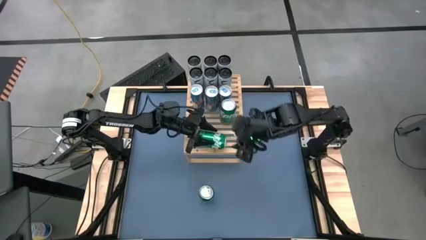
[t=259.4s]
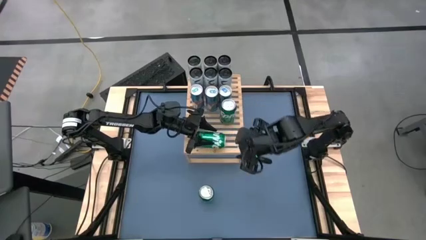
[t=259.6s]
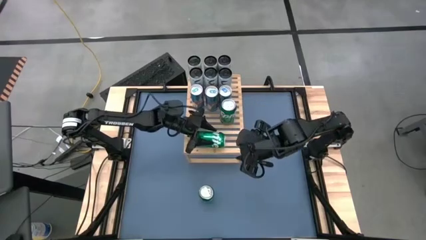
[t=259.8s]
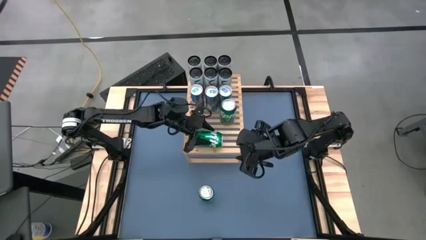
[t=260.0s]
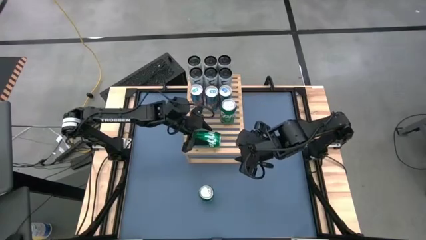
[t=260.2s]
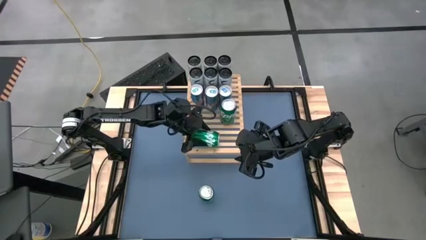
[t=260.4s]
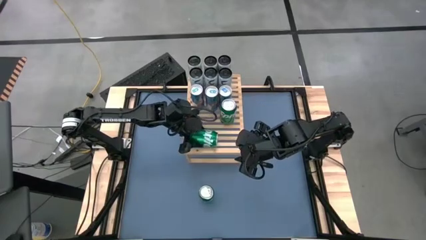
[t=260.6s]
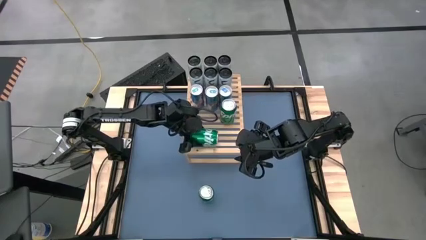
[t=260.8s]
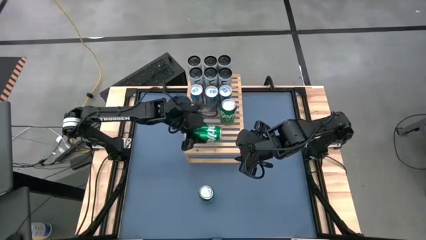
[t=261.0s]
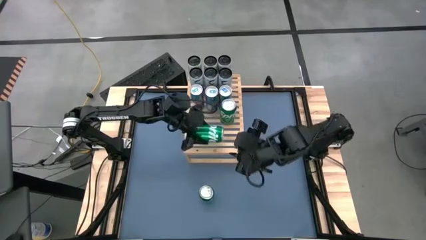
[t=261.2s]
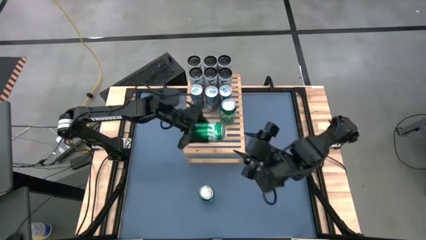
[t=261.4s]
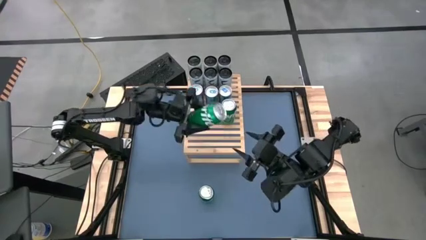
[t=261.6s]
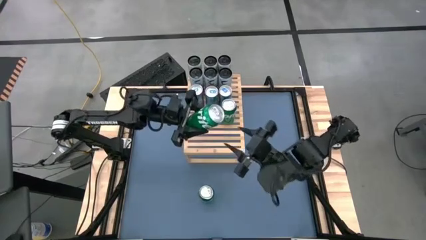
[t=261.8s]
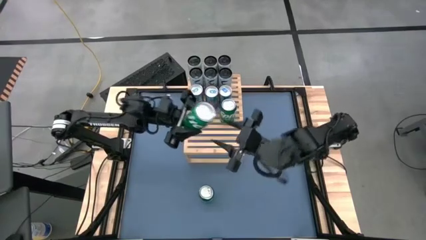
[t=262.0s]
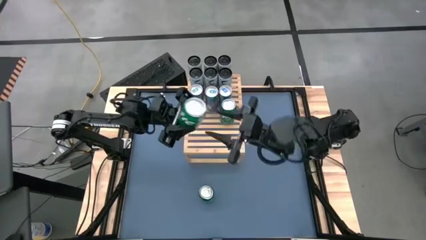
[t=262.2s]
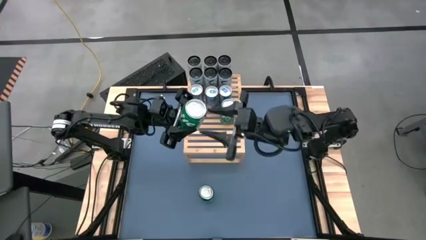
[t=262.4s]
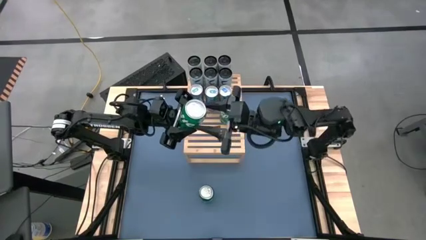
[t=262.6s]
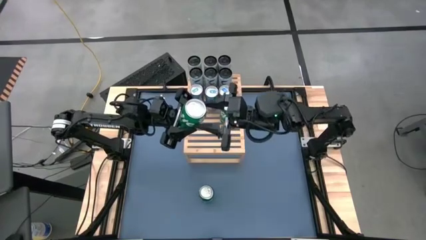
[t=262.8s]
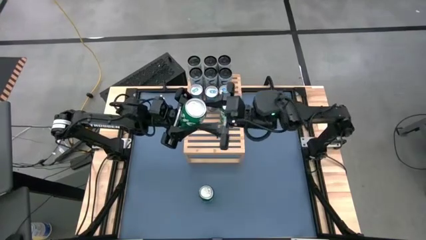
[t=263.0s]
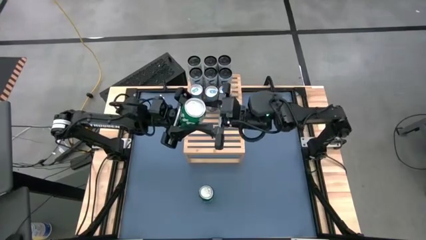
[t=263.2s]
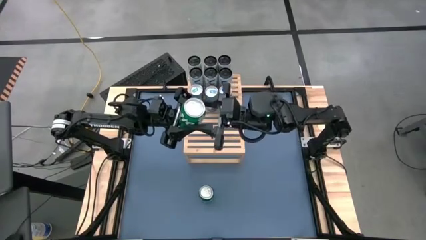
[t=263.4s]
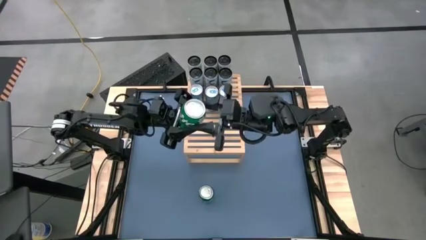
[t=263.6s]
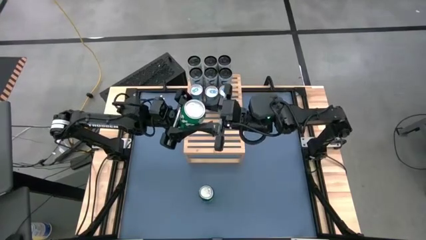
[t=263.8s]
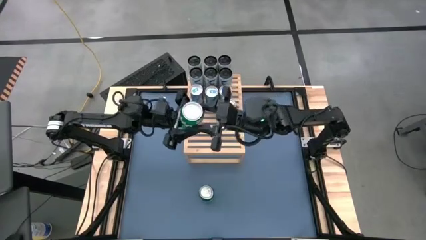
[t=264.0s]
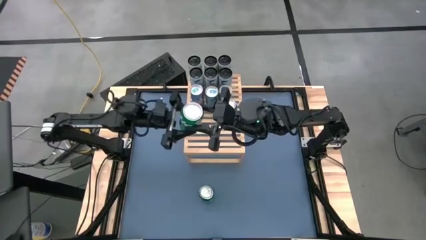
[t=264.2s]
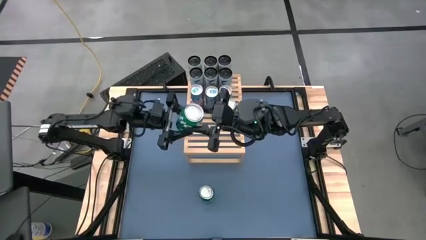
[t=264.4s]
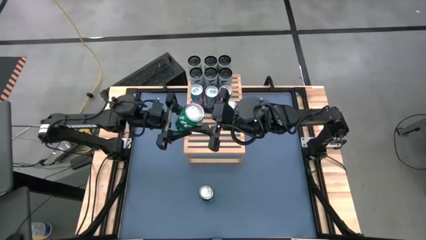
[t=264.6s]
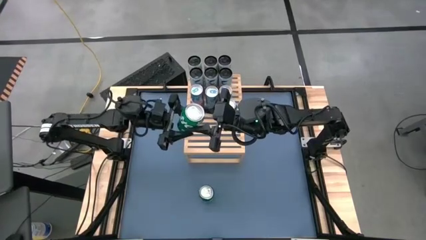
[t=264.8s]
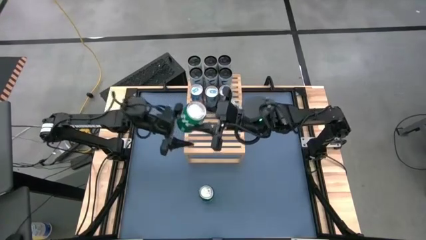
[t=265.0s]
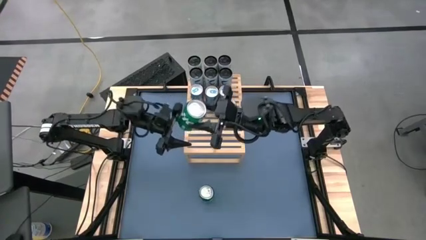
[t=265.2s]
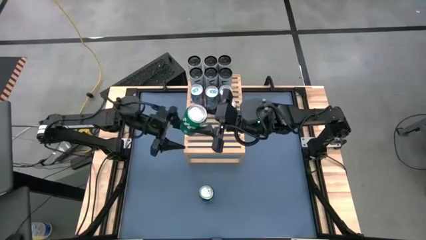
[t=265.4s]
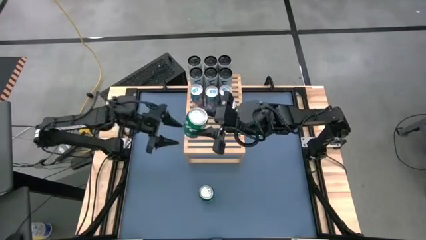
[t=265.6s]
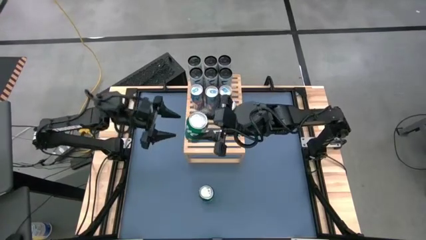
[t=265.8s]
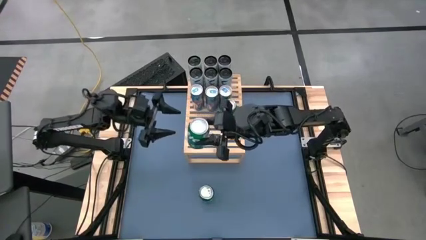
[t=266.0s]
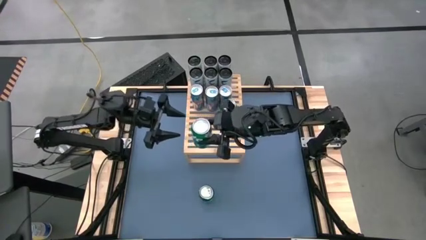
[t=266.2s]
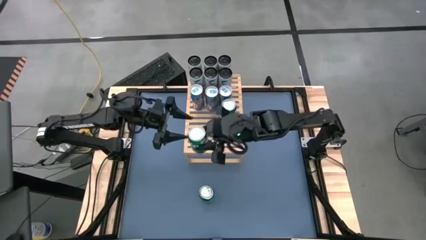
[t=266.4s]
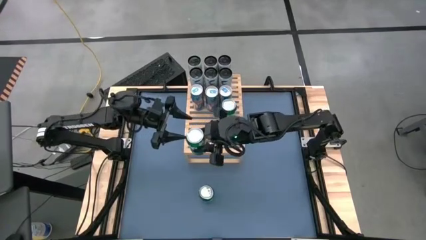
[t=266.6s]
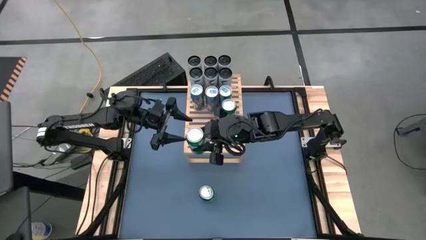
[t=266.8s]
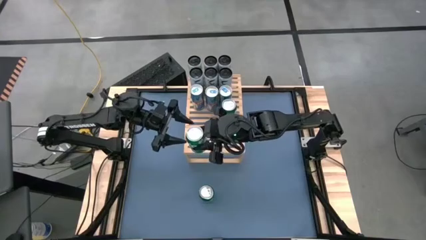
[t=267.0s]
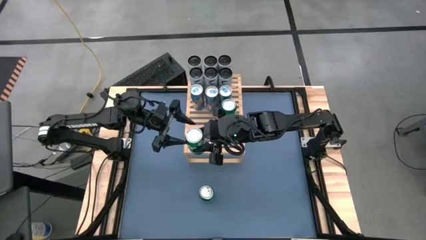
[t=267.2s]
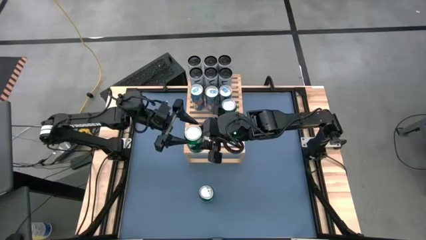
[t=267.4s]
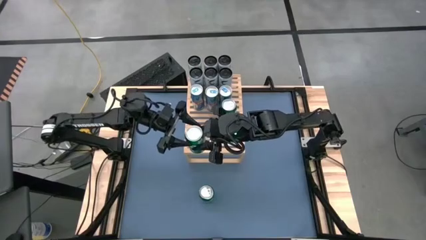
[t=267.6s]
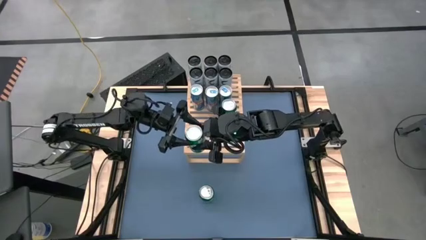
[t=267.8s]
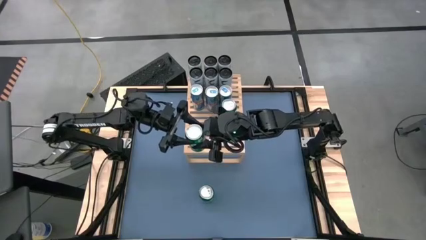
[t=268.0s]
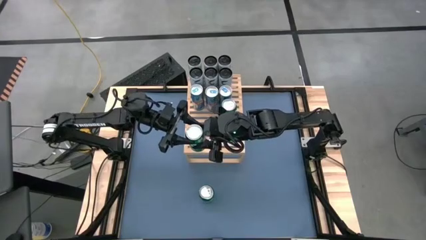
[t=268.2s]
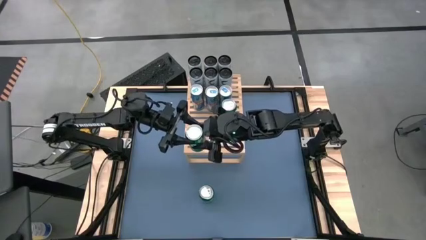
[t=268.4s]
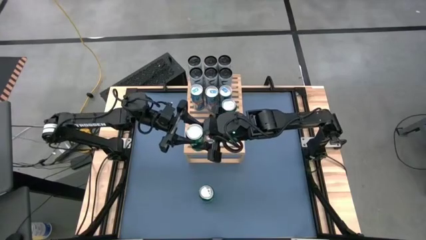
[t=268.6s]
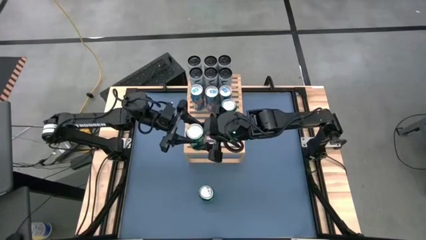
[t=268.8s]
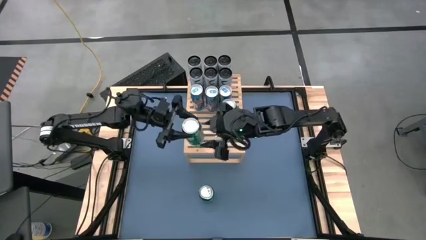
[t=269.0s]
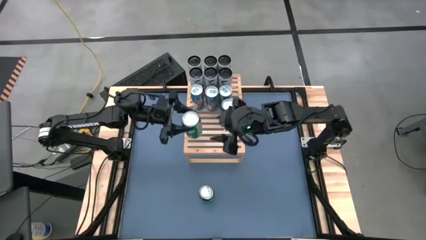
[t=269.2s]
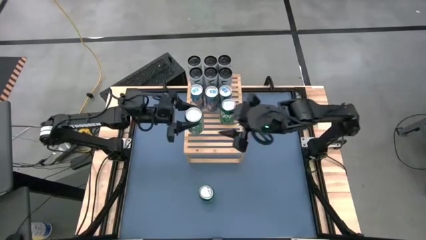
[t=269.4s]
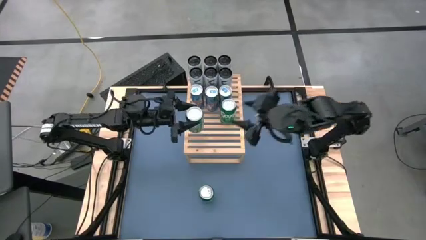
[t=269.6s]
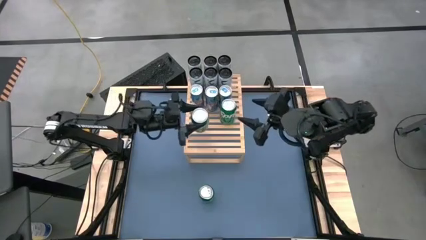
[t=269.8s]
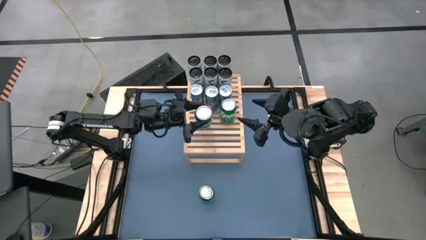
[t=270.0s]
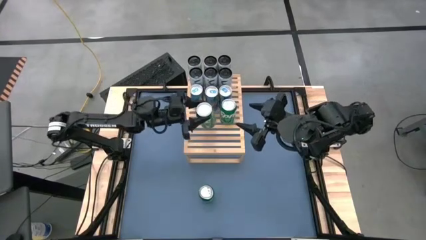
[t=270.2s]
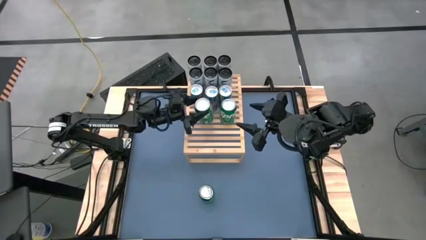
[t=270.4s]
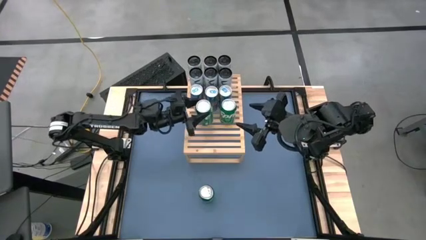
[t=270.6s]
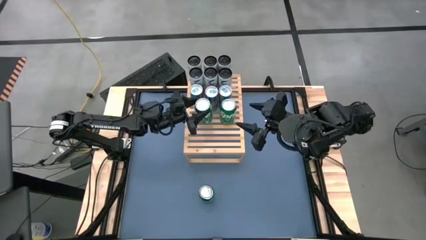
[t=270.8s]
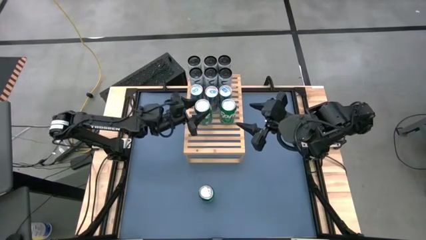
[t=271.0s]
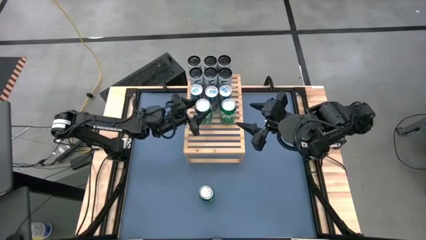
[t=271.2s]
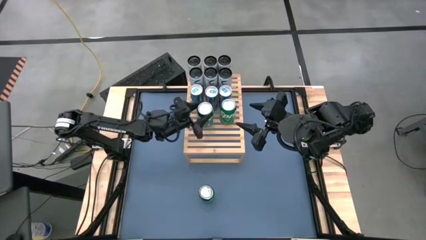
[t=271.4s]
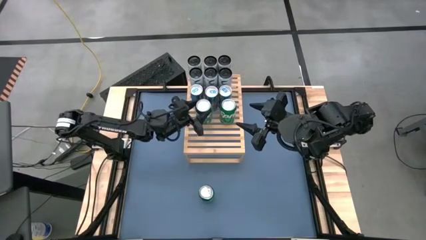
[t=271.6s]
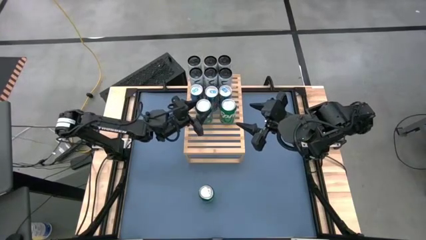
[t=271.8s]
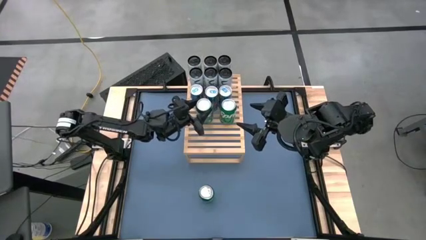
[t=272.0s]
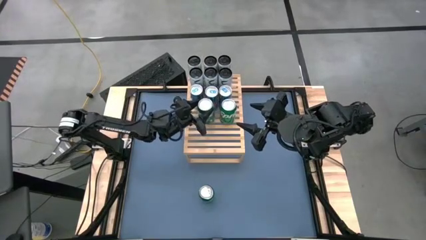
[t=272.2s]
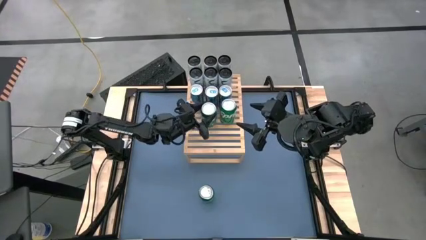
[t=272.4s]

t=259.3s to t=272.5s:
Task: Place canned beverage on shelf
Put the green soda can on the shelf aligned to the other green soda
